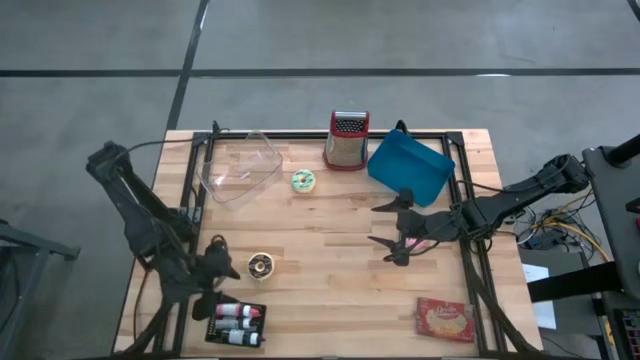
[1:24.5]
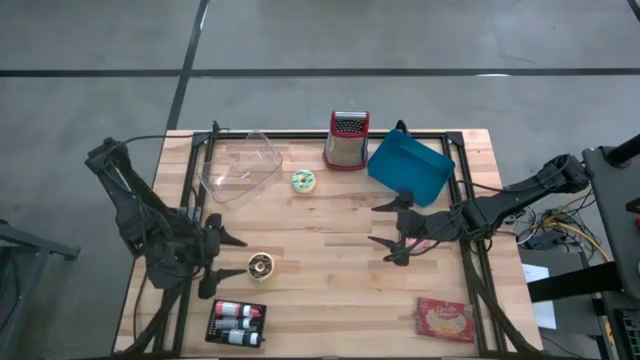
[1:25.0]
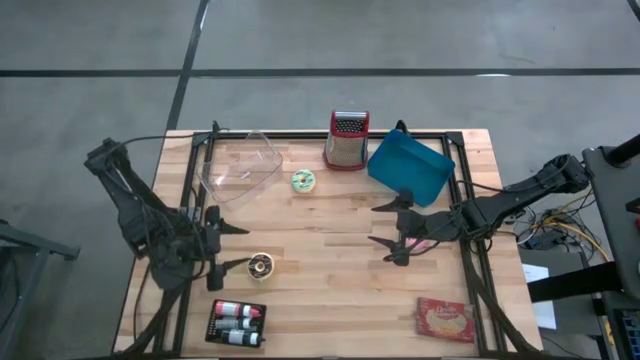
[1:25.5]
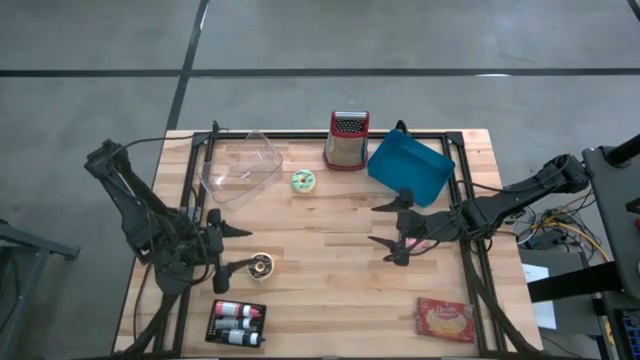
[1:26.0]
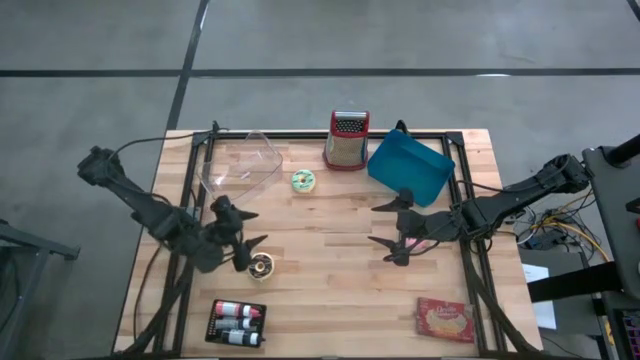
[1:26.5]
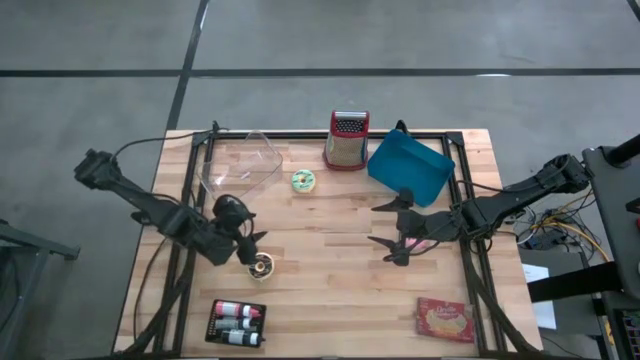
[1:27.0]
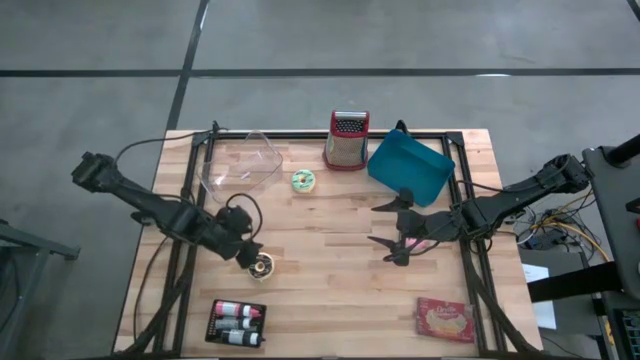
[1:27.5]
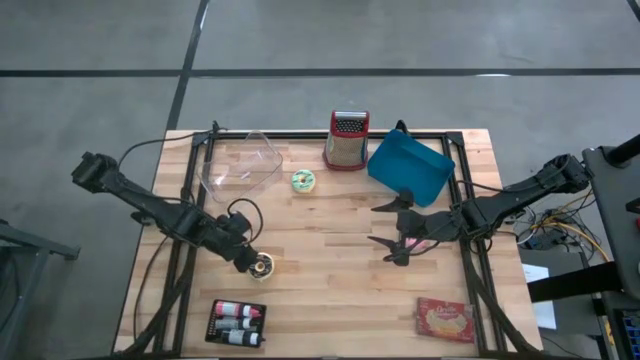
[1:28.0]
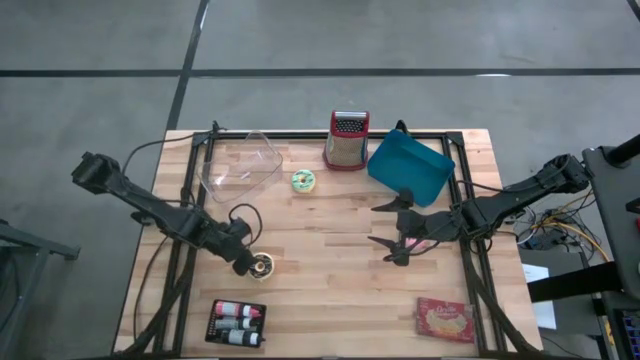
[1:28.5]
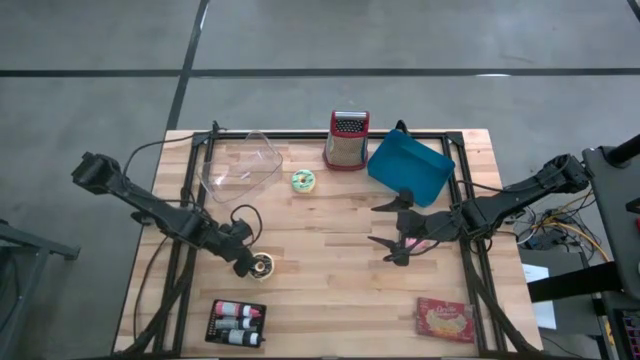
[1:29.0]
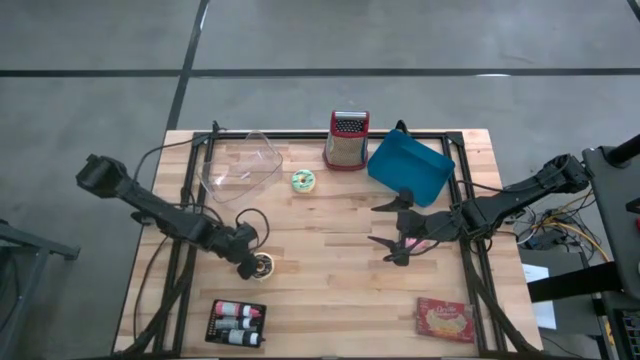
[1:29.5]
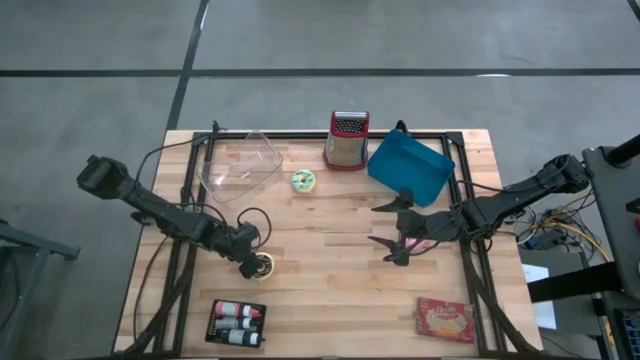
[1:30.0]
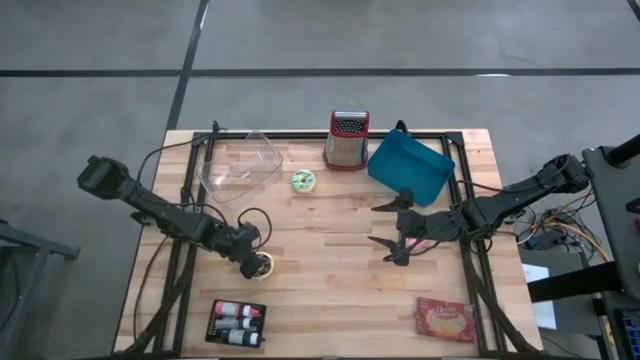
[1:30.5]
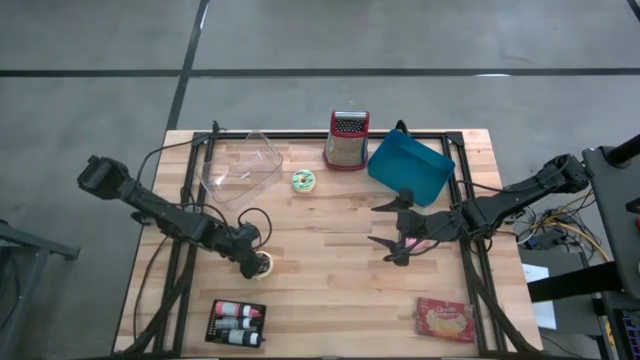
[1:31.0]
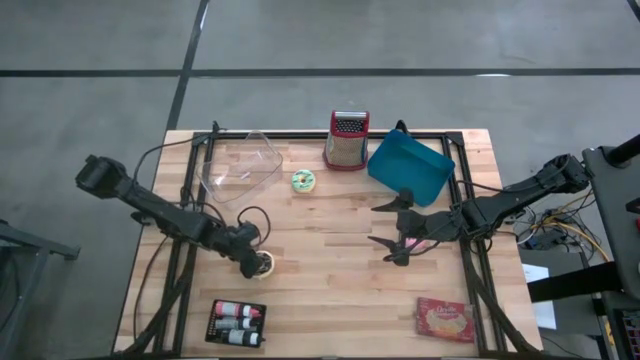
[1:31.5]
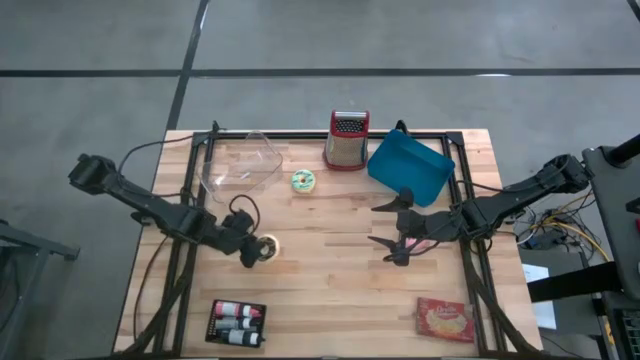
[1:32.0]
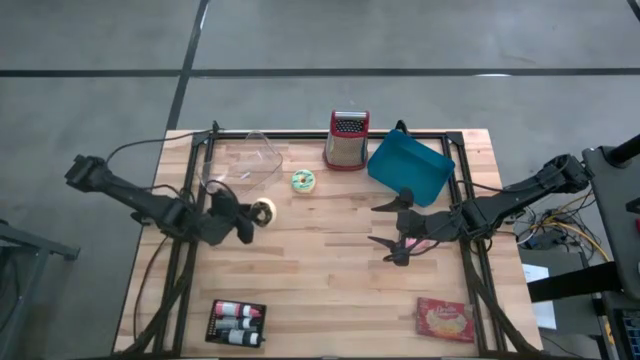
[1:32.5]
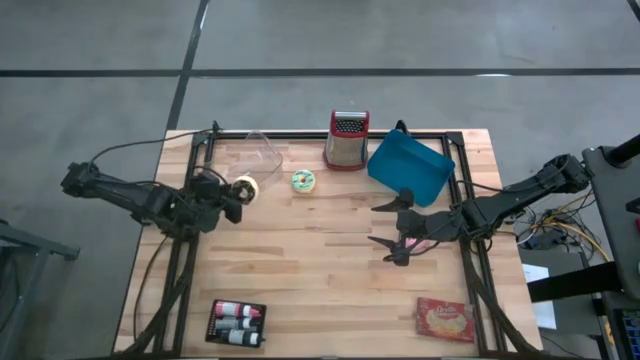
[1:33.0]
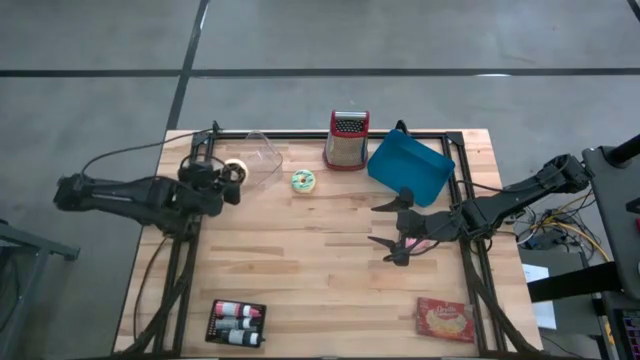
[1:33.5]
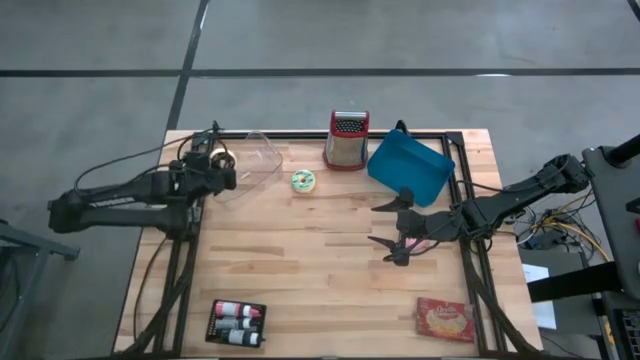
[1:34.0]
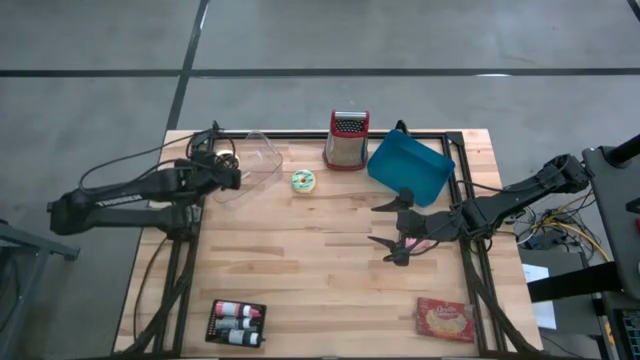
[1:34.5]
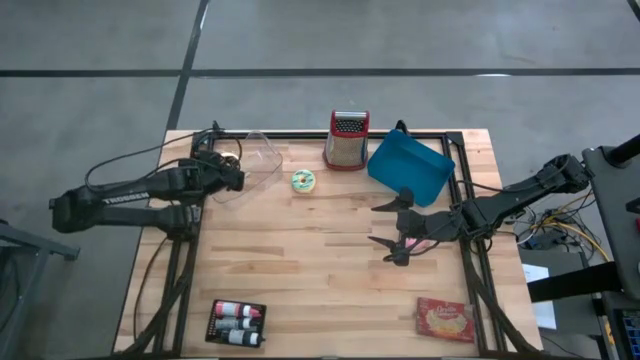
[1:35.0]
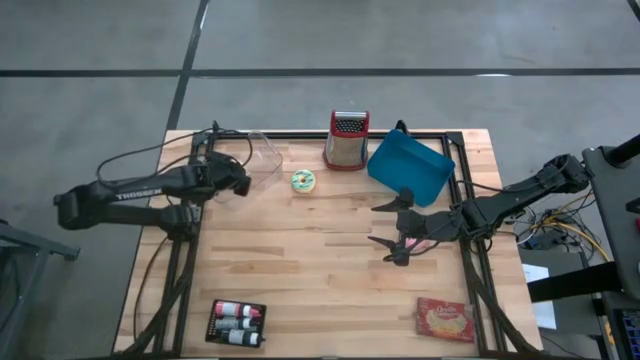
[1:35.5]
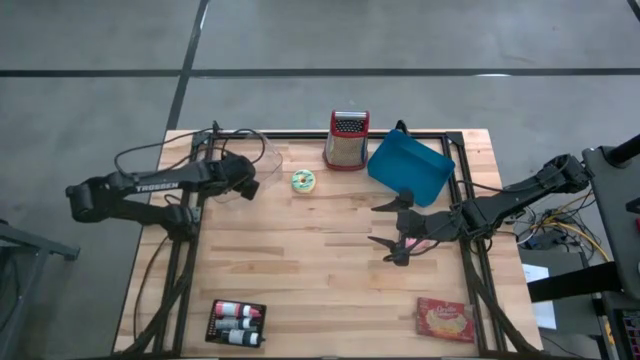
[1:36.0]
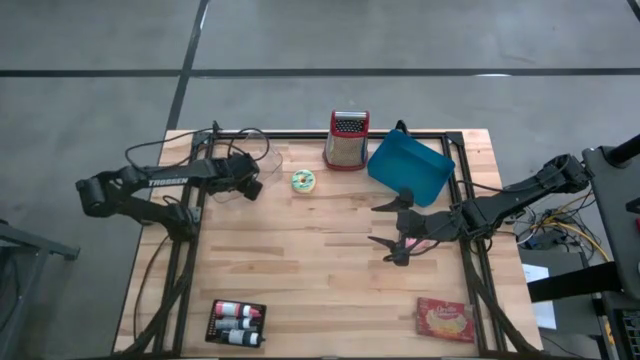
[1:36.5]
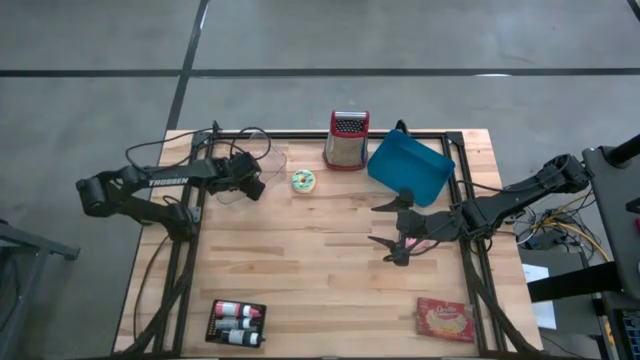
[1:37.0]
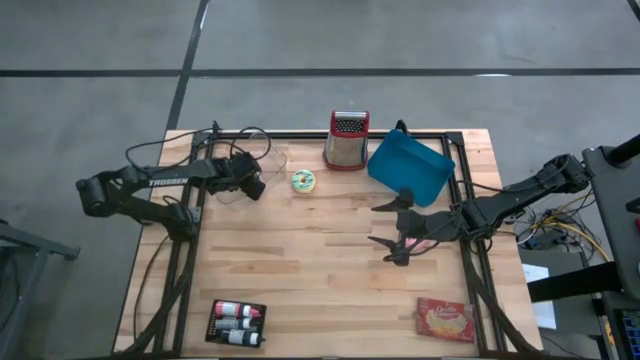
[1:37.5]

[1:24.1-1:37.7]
Task: Pick & Place Food Item
Put the black donut into the transparent bin

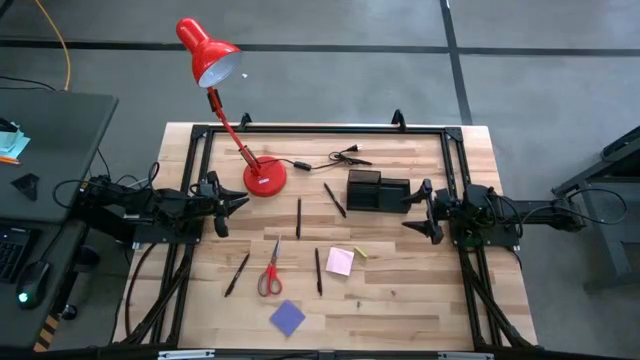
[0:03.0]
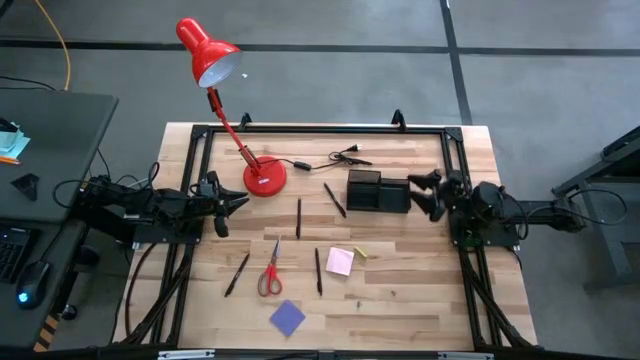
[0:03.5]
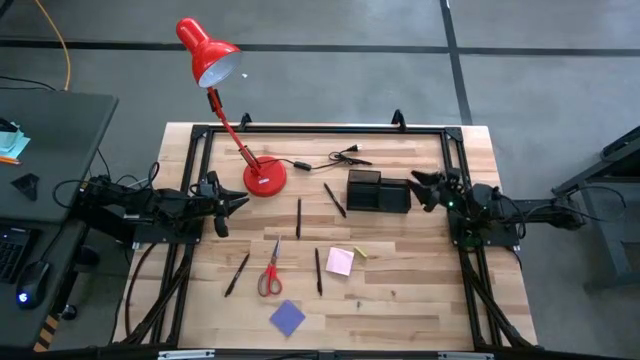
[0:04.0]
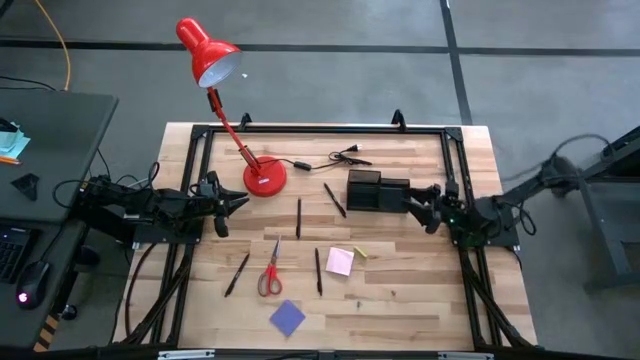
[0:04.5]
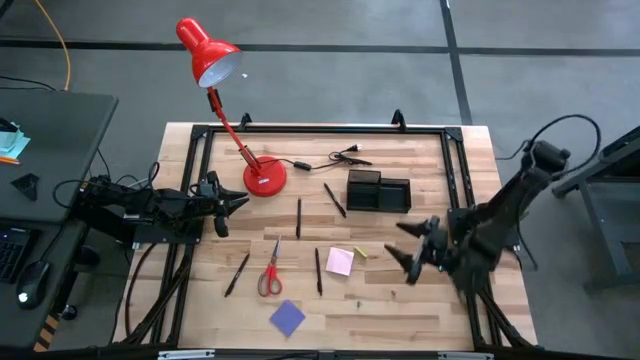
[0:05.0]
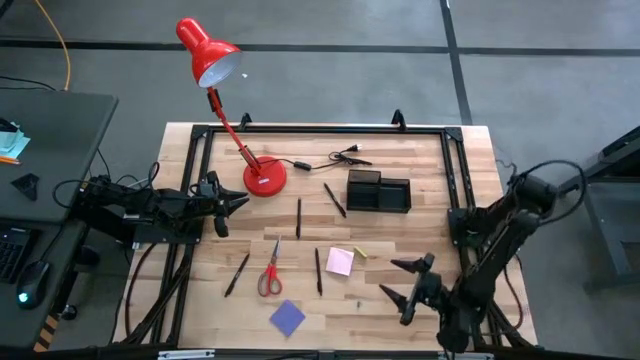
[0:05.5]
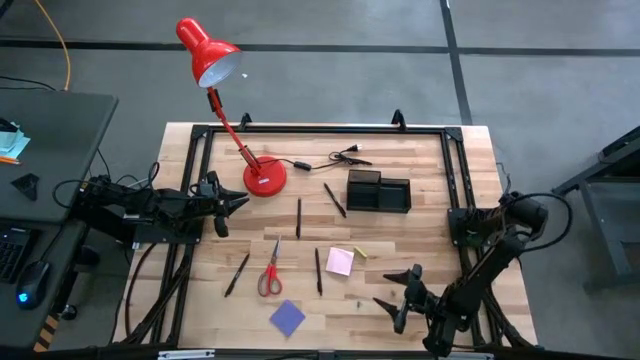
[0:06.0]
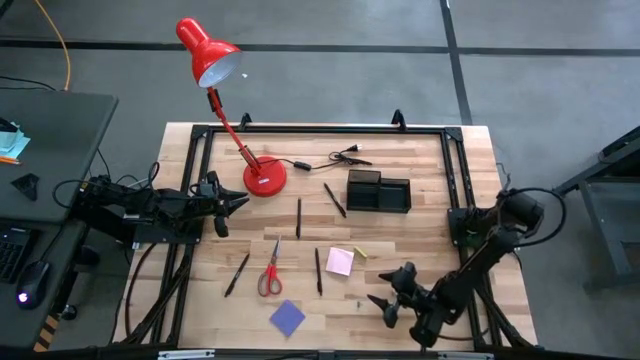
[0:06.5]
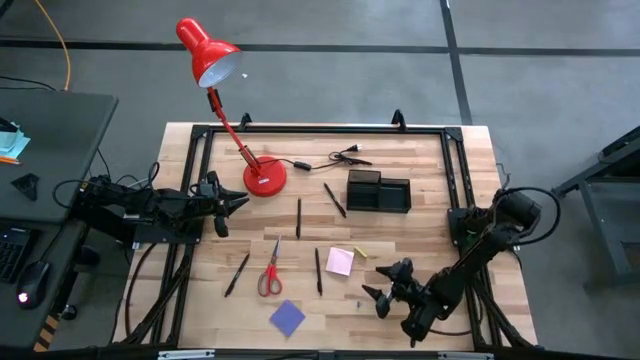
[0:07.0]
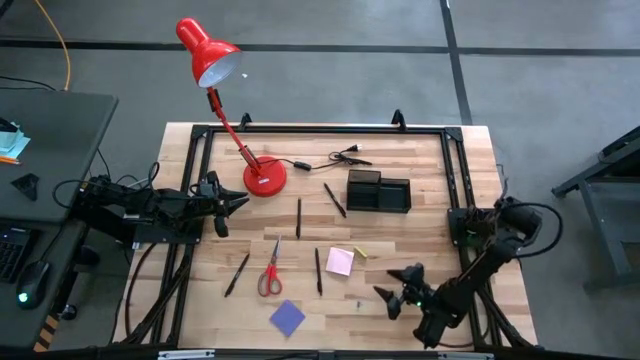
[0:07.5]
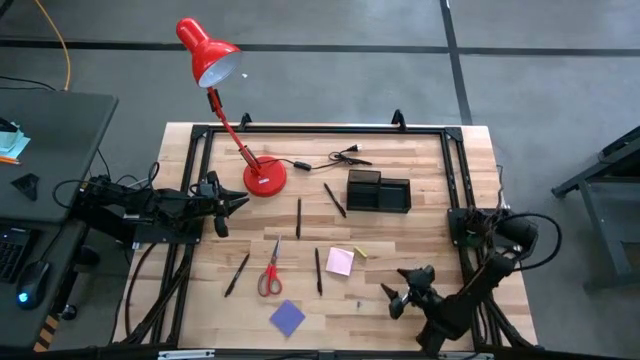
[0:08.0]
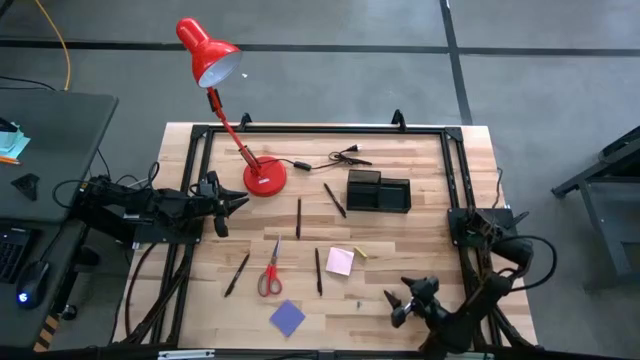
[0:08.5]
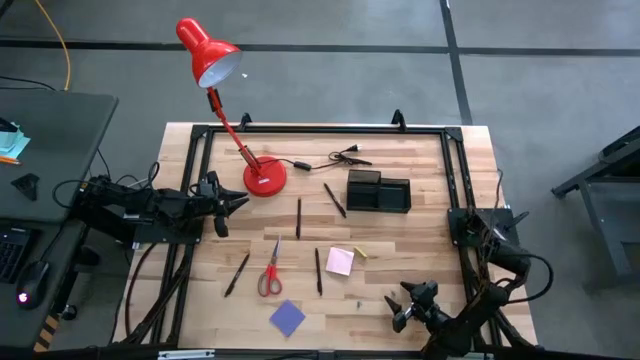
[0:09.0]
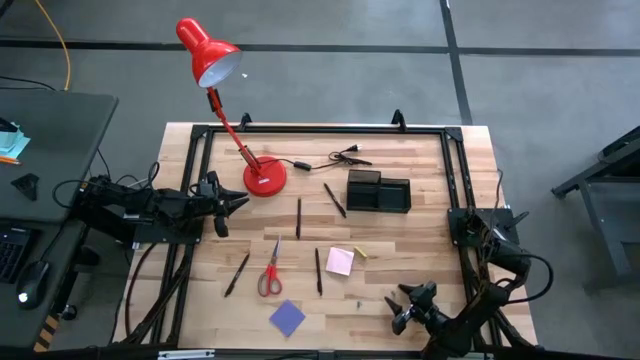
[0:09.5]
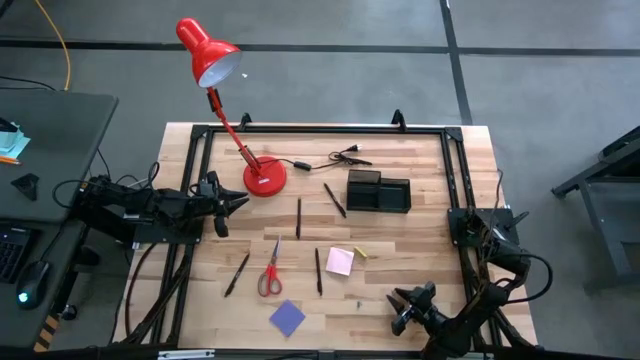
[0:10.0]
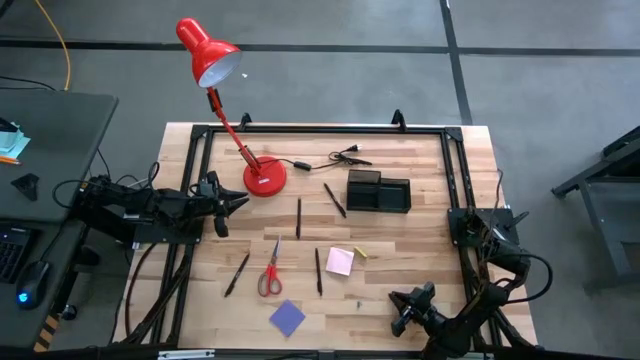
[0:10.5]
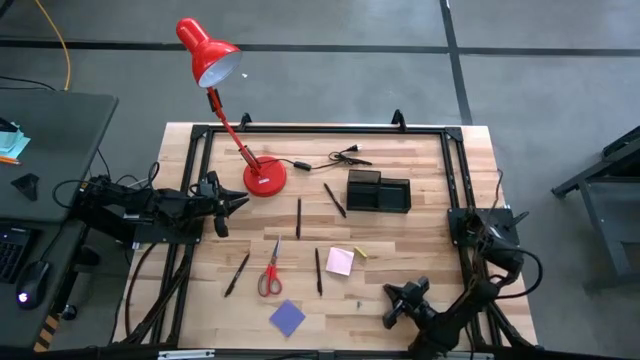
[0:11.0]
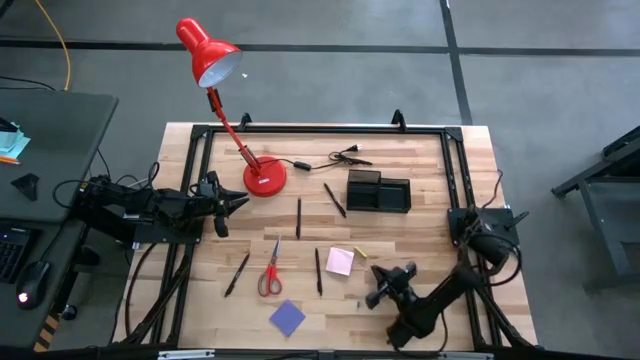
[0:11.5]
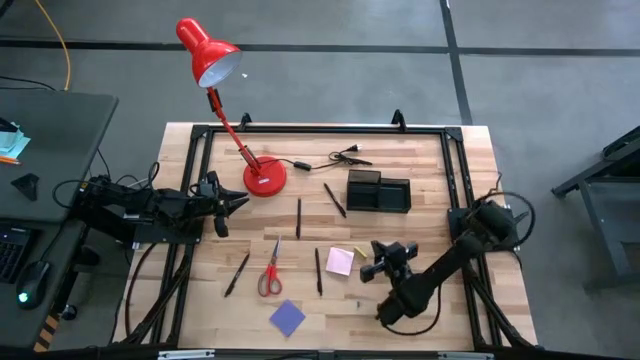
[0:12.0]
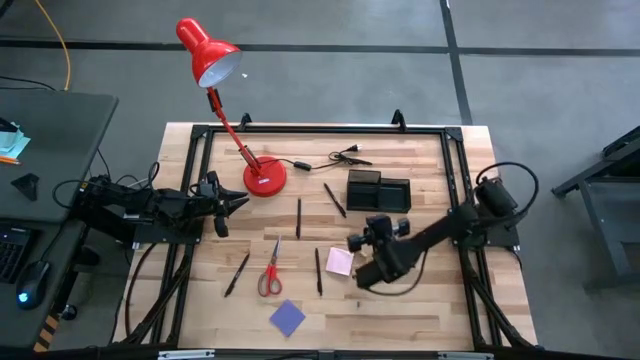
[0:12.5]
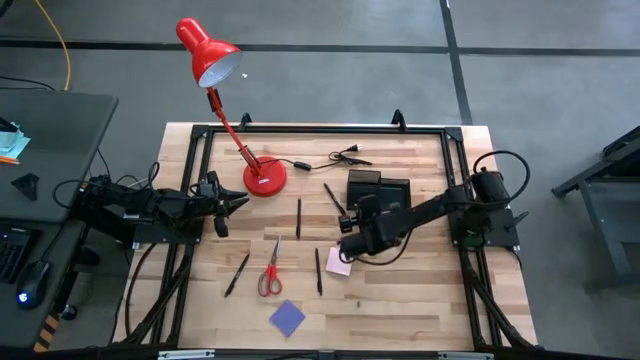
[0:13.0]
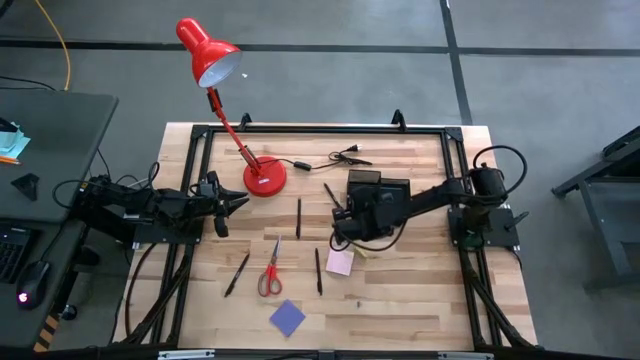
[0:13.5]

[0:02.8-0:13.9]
Task: Pick and place office supplies into organizer
Put the red paper clip into the desk organizer
